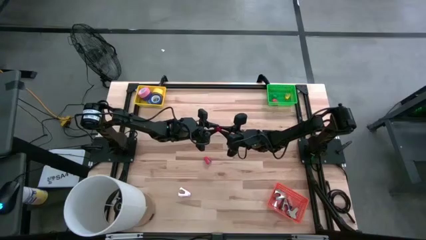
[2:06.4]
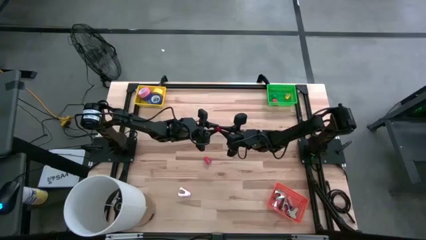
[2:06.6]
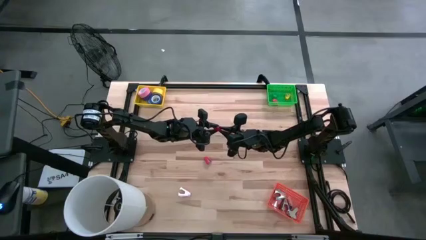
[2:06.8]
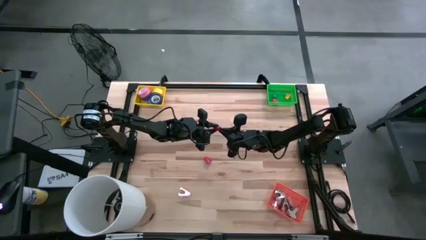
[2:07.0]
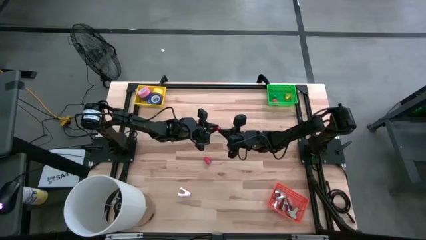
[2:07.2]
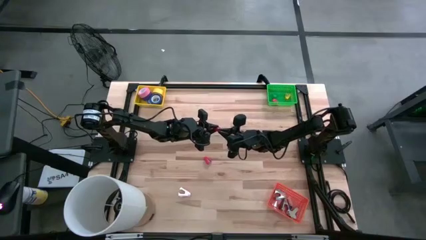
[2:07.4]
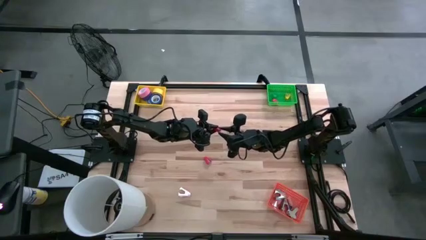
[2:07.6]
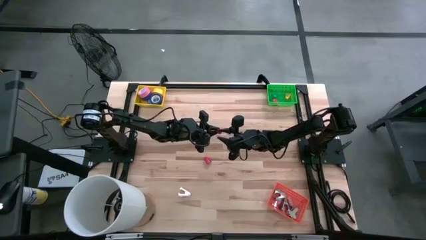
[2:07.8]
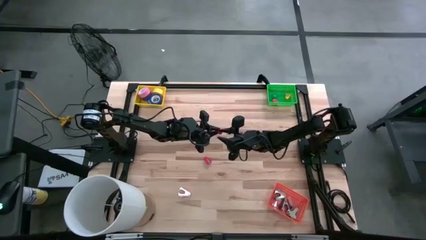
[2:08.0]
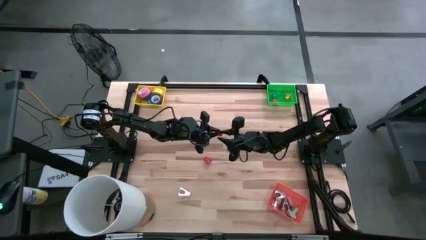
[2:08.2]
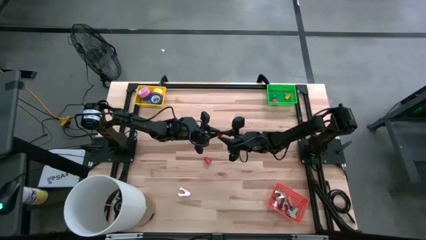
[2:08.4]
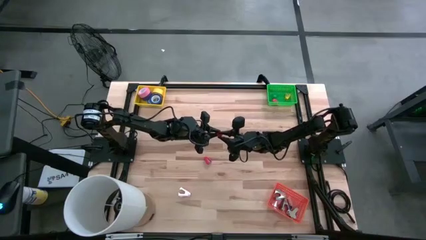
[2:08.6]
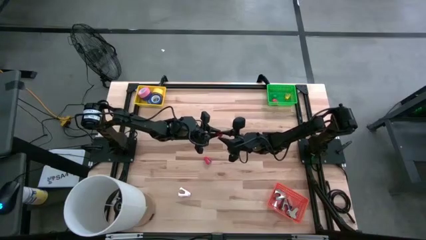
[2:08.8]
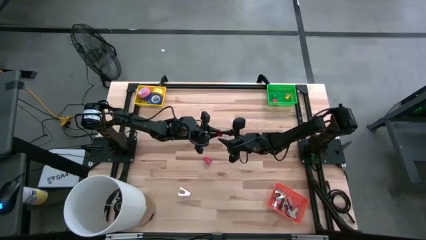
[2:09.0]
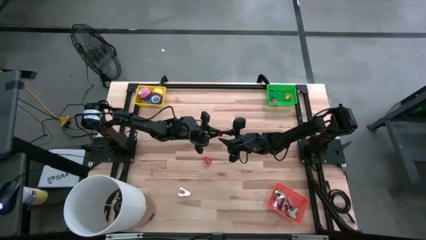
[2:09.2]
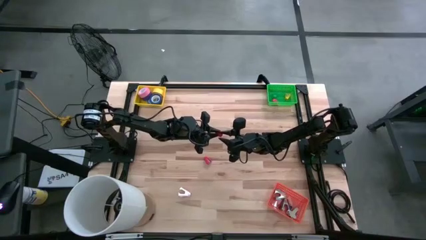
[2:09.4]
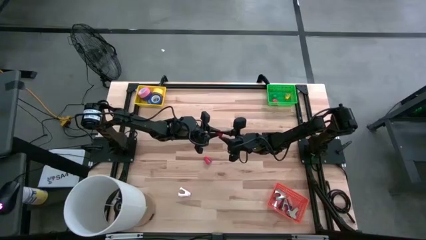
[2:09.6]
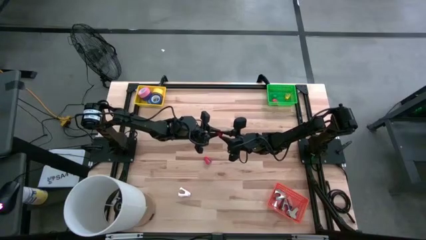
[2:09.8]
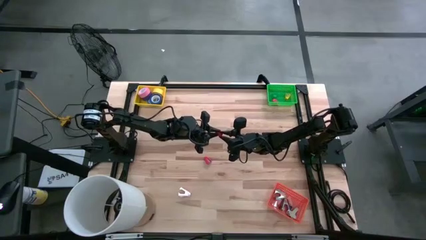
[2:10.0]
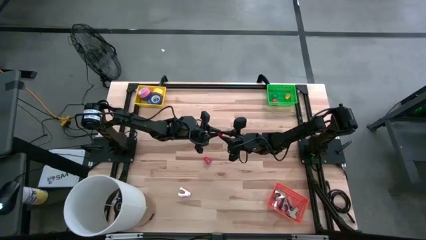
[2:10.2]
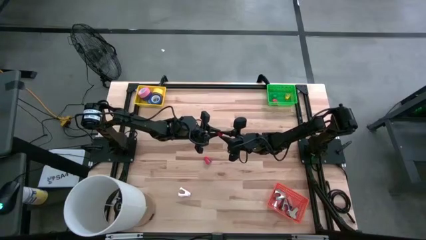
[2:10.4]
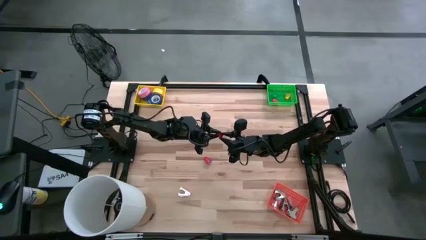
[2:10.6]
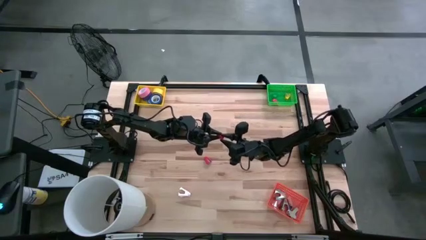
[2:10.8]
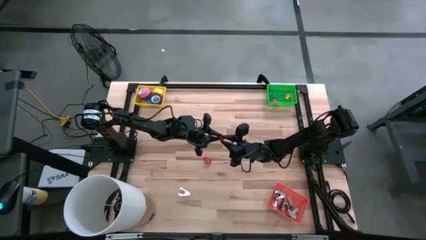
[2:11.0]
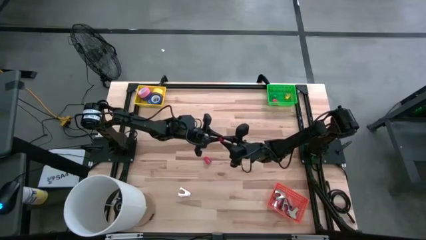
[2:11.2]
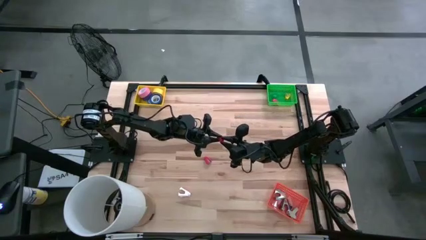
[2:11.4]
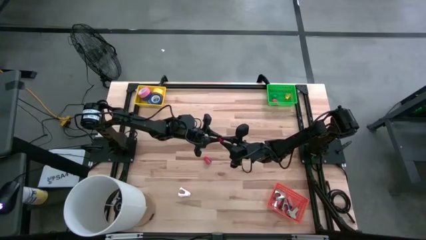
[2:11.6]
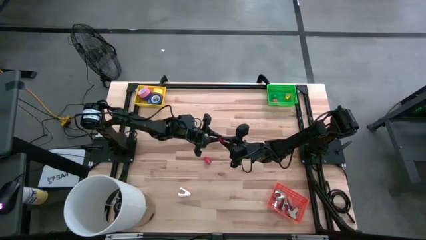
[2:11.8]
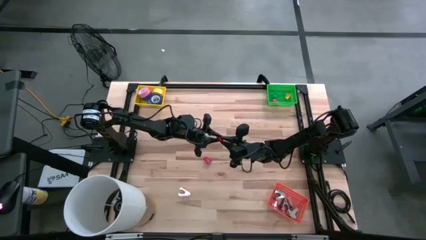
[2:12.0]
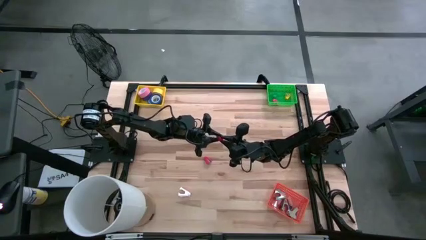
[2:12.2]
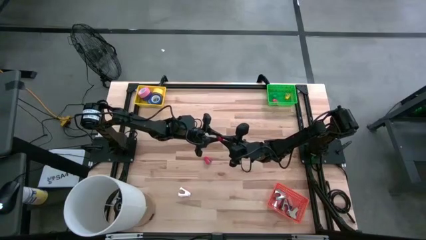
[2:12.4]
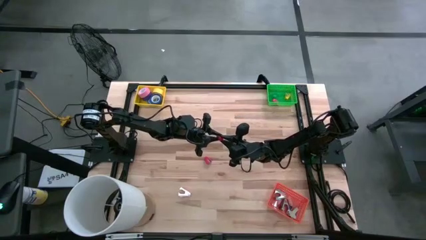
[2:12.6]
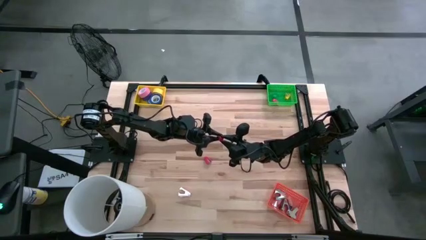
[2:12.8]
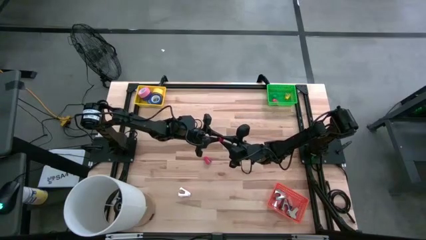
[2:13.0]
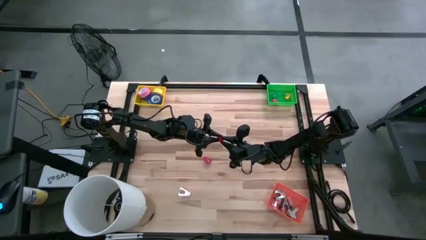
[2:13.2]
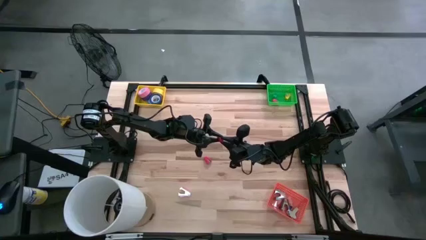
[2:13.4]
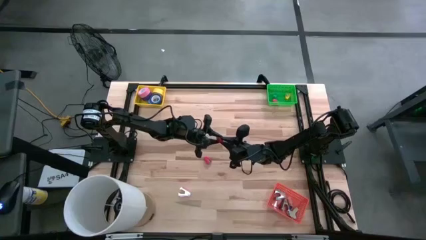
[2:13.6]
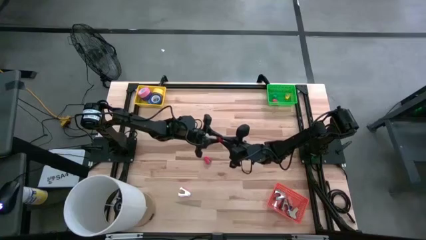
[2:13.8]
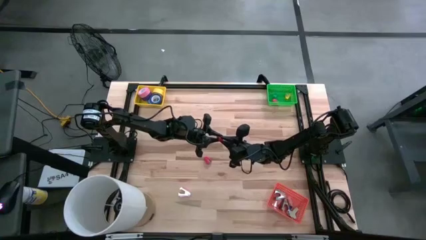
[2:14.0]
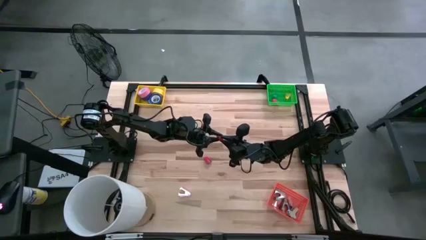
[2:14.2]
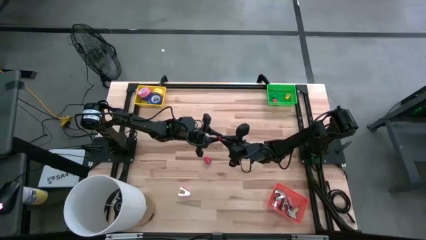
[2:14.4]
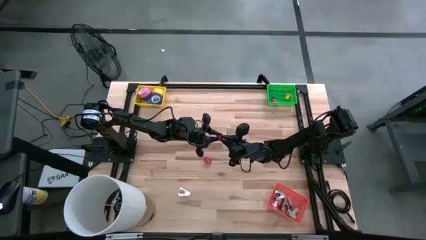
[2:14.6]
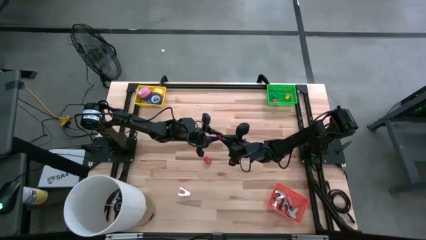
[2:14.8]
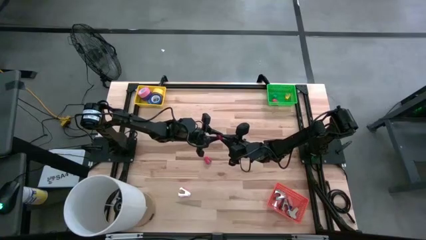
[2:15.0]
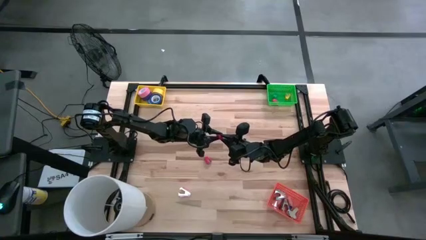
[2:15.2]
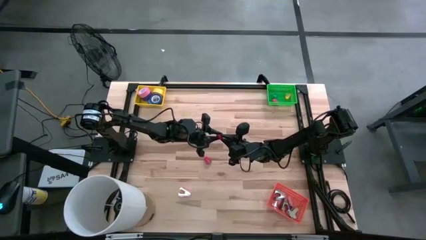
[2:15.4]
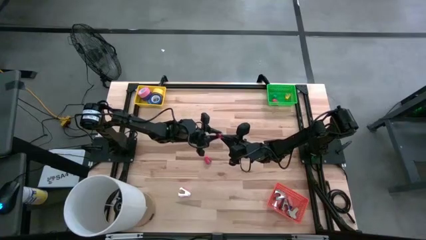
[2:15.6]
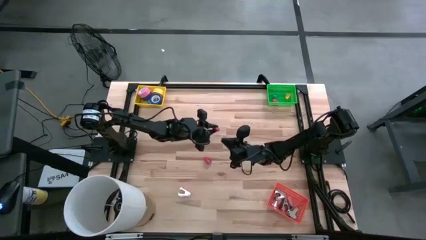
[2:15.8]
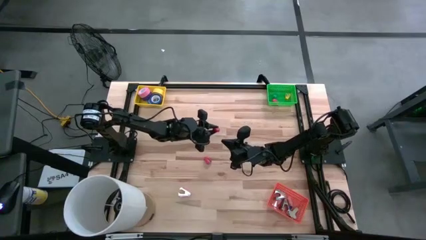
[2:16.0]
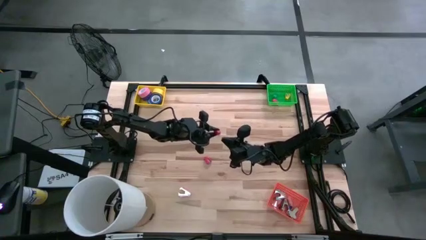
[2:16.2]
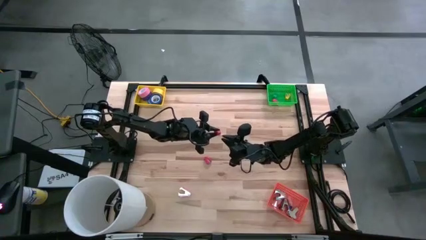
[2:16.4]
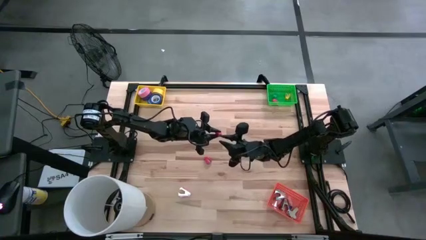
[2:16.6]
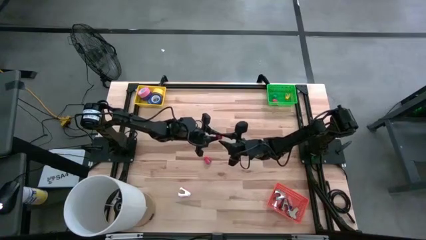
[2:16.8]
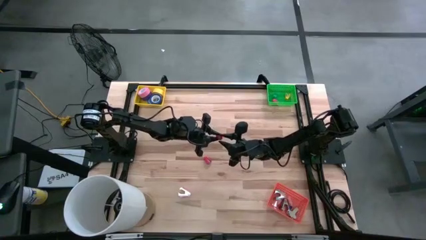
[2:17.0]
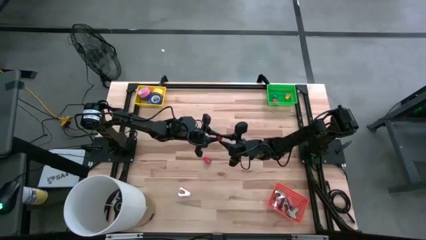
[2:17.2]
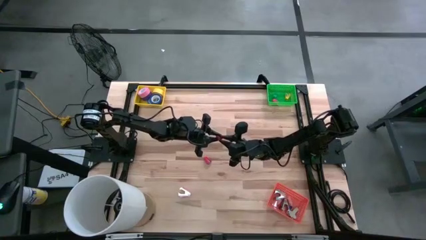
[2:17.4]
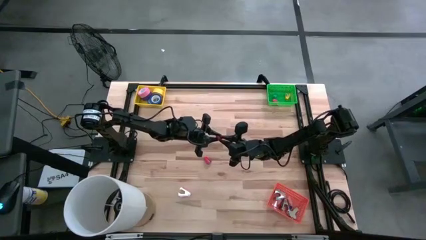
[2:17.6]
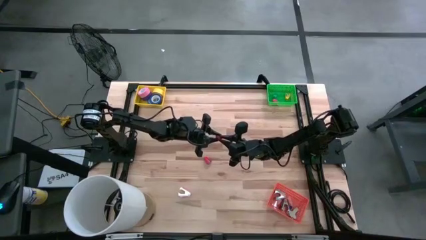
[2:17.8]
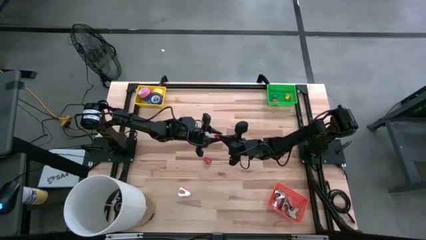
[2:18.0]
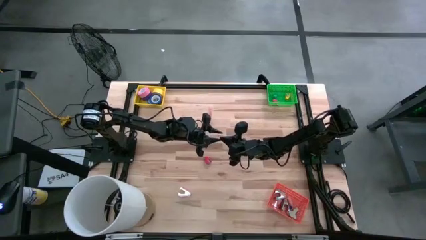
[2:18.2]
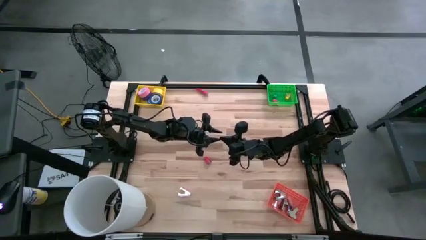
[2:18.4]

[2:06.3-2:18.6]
Task: Pick and place Stapler, Stapler remover, tape
Put the left red stapler into the green bin

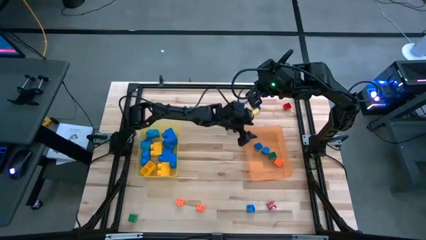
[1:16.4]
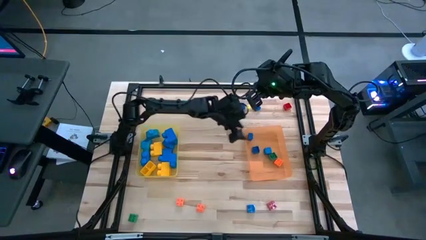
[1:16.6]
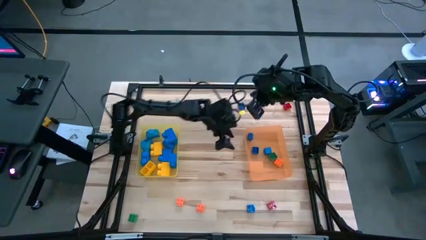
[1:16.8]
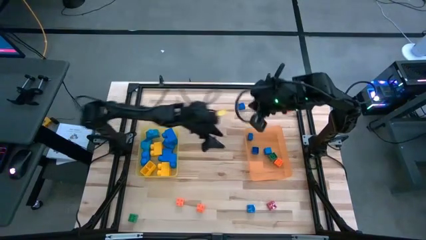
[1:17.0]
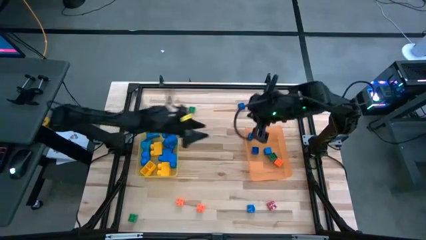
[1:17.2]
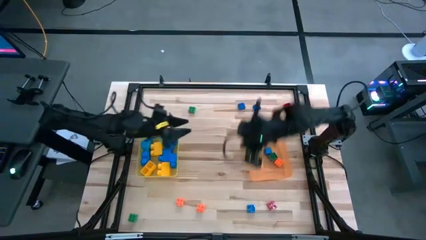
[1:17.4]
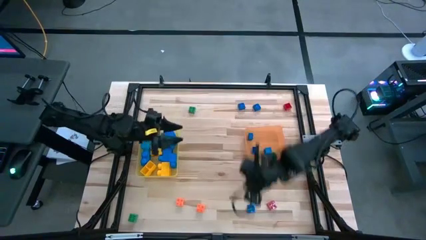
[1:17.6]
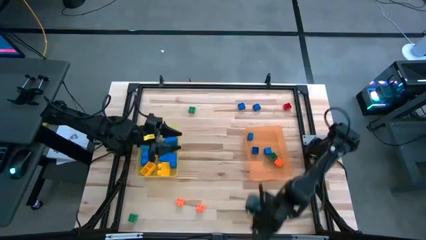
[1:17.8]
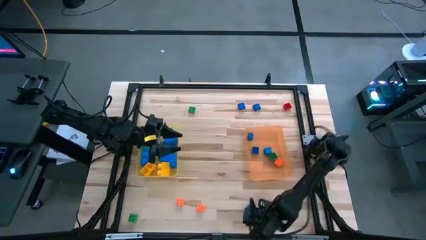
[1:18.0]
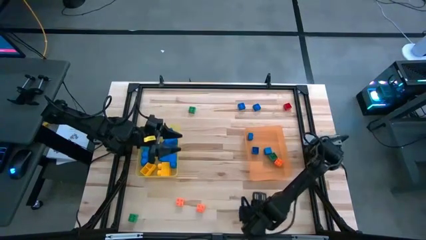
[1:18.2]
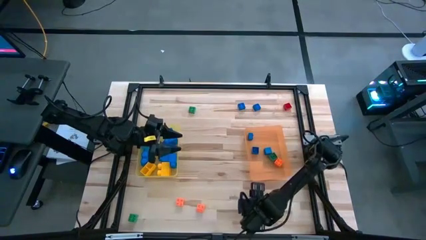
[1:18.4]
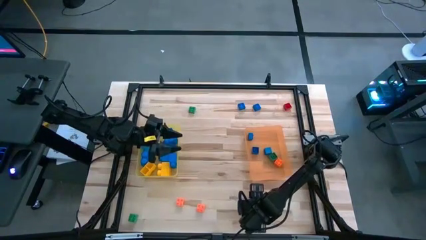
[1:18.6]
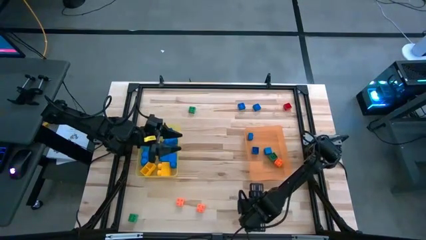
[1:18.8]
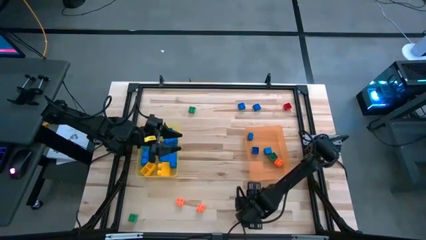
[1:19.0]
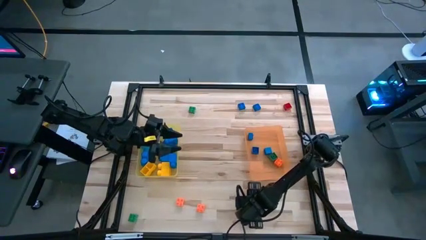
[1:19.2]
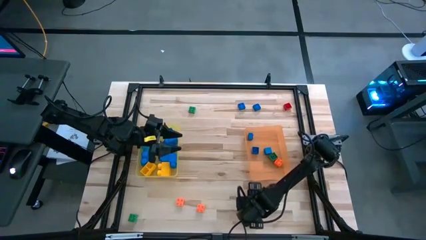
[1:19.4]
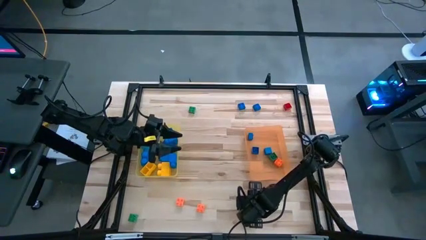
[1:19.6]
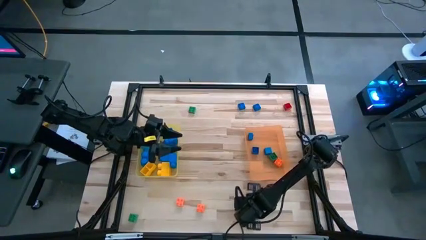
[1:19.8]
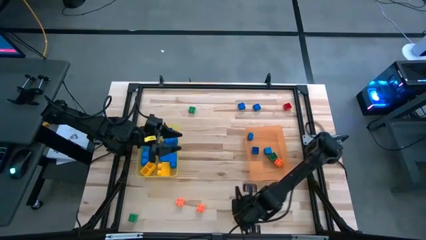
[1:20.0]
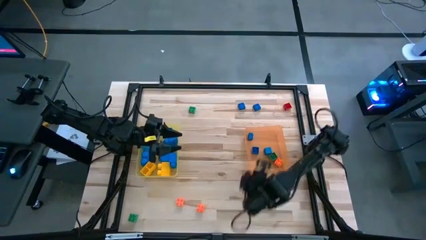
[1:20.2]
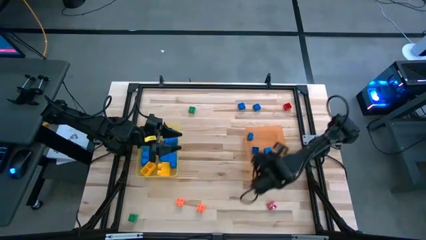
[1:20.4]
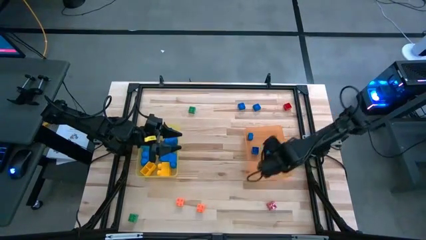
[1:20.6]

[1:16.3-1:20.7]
Task: Sort blocks by size
Put the small blue game piece into the orange bin
